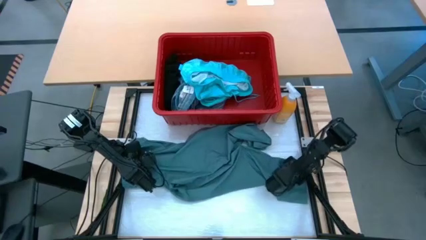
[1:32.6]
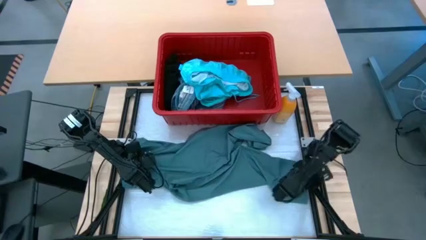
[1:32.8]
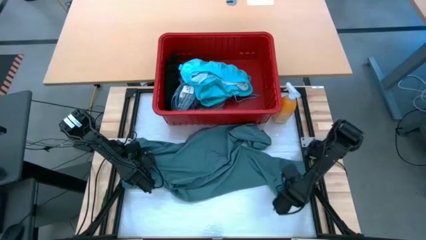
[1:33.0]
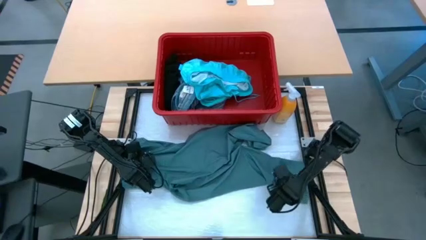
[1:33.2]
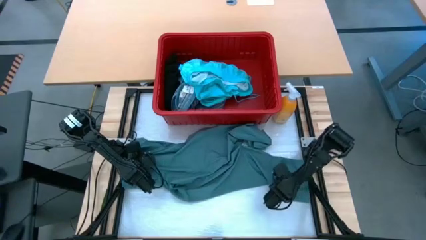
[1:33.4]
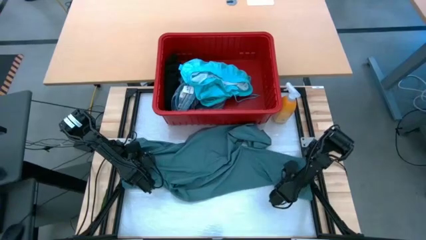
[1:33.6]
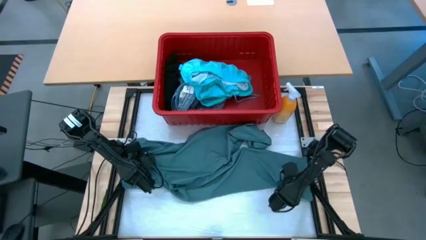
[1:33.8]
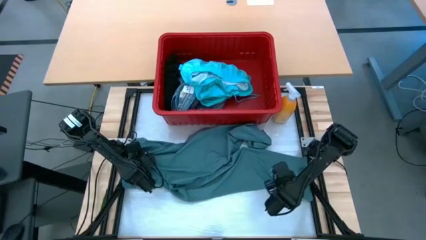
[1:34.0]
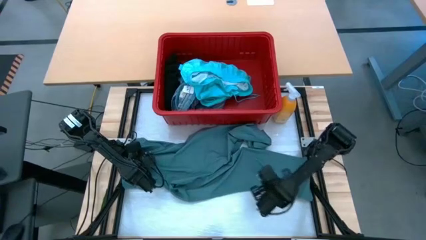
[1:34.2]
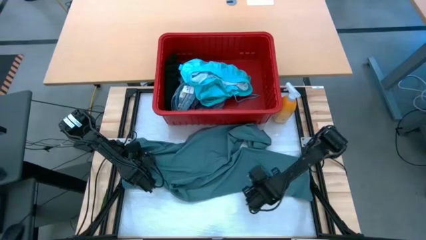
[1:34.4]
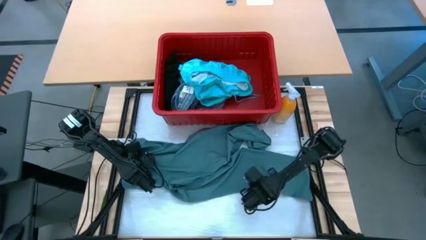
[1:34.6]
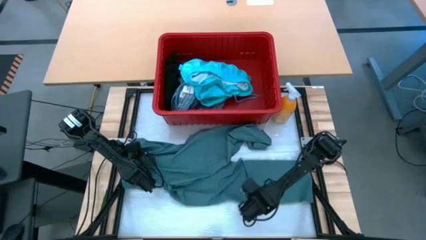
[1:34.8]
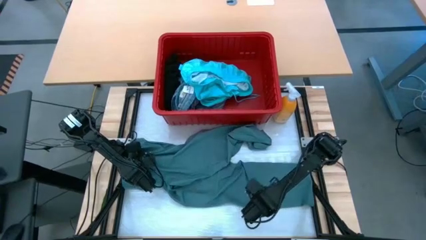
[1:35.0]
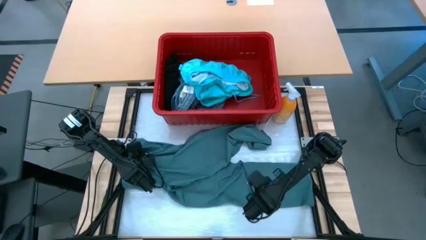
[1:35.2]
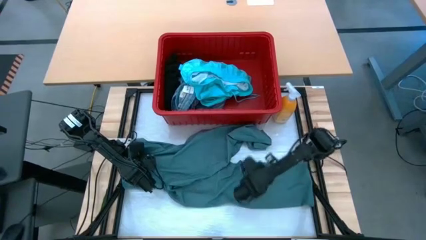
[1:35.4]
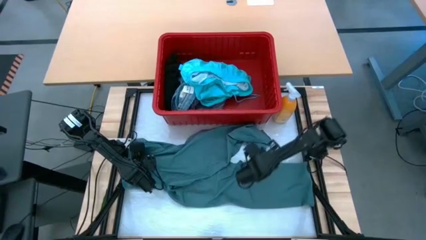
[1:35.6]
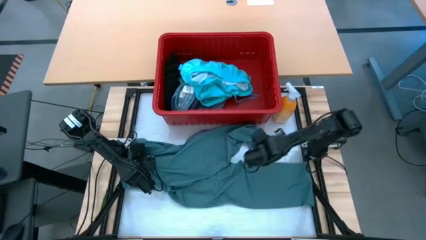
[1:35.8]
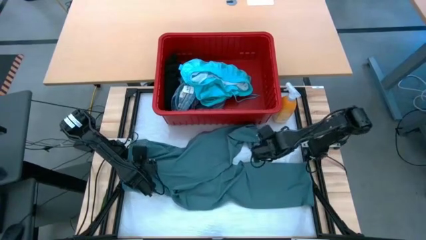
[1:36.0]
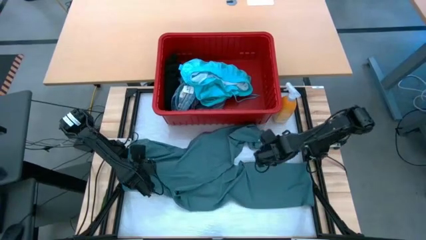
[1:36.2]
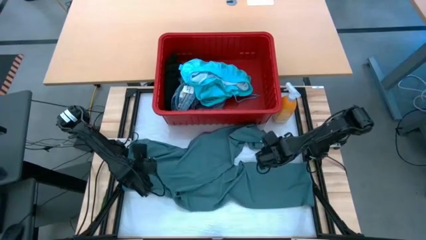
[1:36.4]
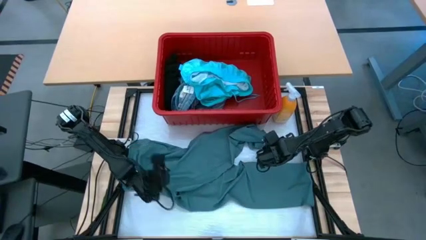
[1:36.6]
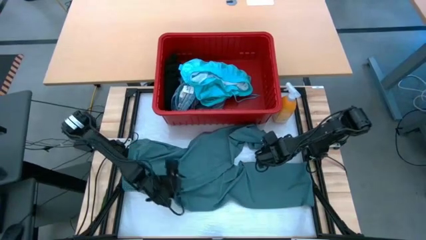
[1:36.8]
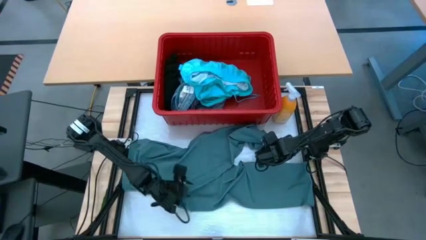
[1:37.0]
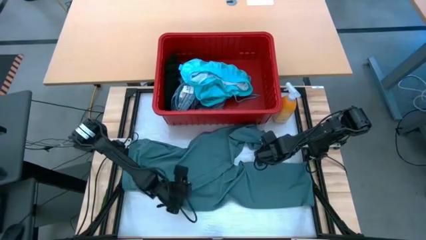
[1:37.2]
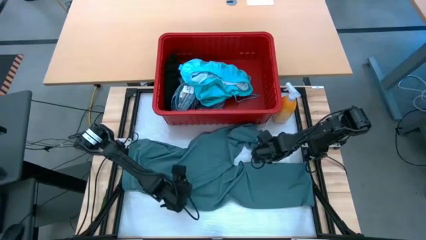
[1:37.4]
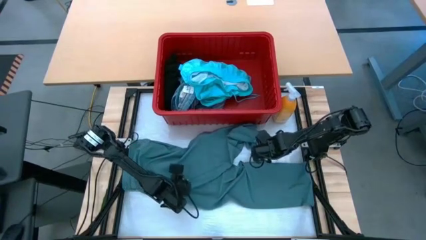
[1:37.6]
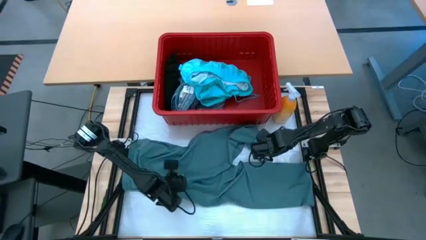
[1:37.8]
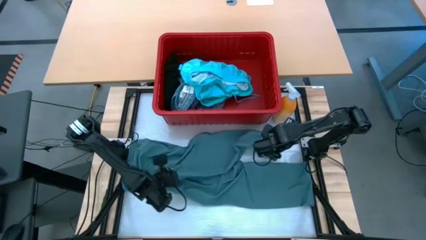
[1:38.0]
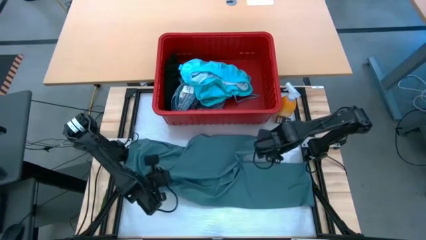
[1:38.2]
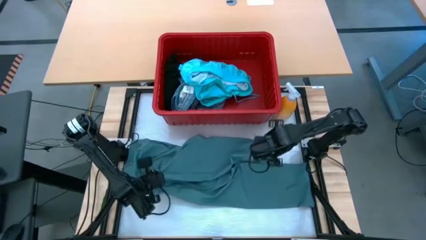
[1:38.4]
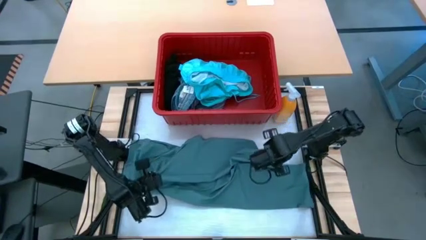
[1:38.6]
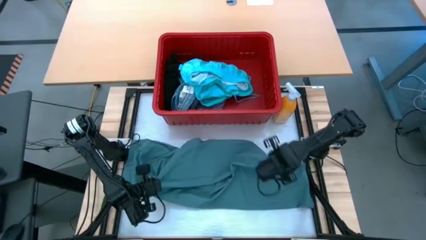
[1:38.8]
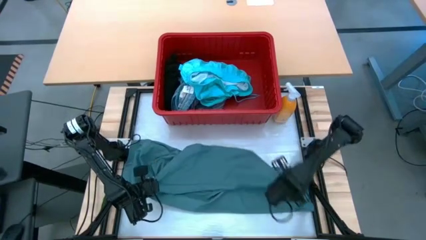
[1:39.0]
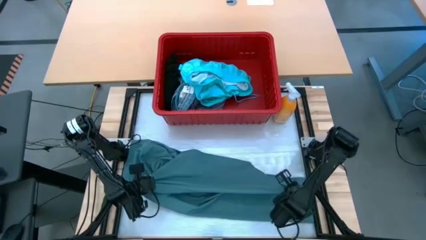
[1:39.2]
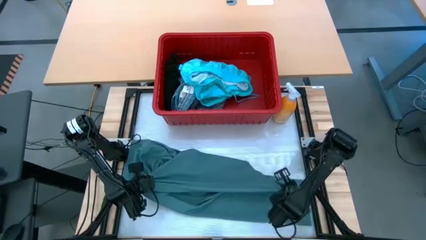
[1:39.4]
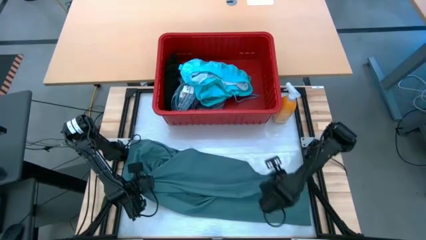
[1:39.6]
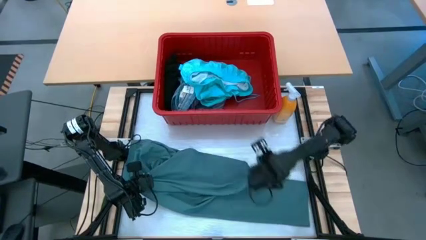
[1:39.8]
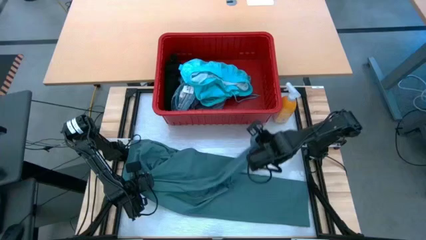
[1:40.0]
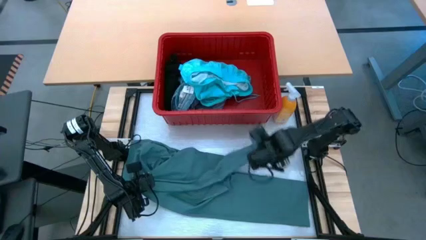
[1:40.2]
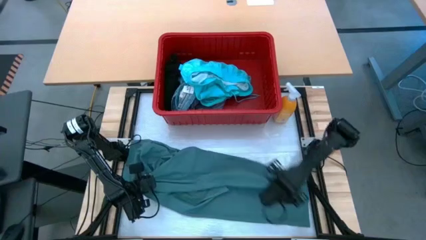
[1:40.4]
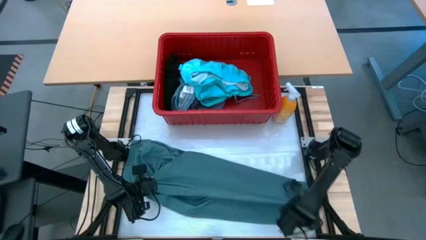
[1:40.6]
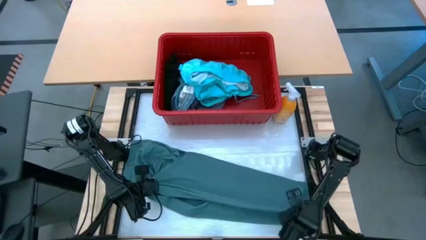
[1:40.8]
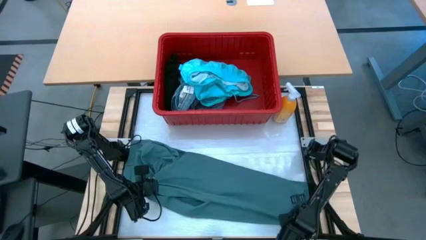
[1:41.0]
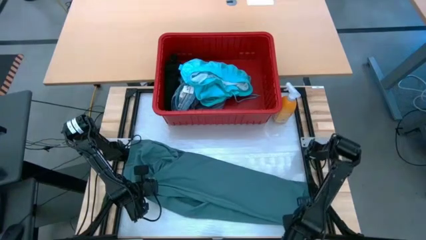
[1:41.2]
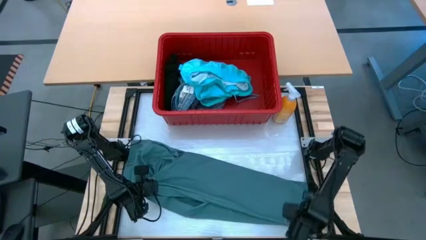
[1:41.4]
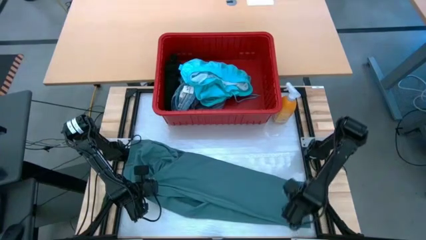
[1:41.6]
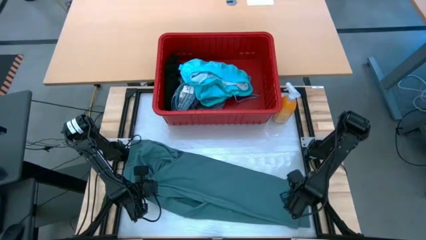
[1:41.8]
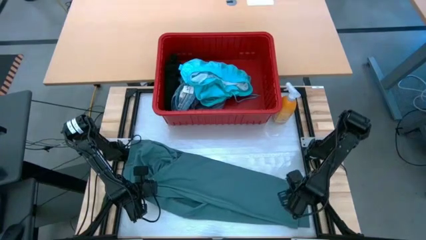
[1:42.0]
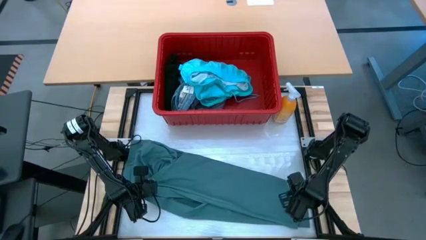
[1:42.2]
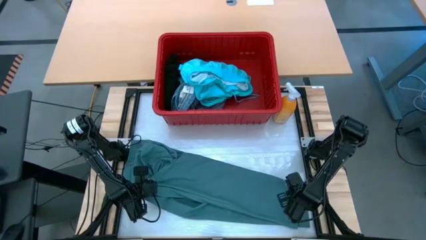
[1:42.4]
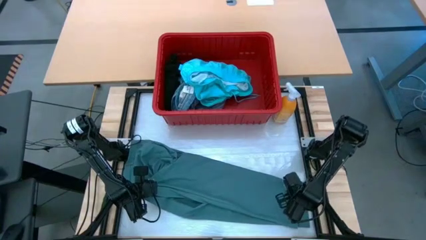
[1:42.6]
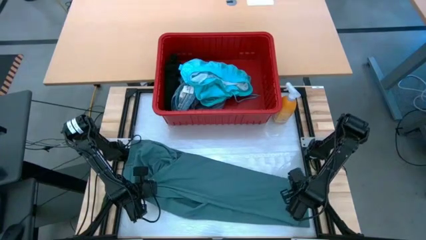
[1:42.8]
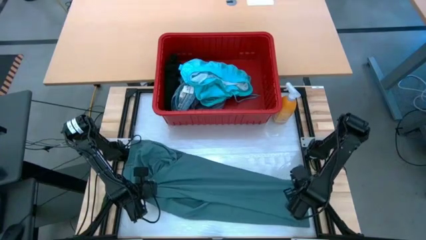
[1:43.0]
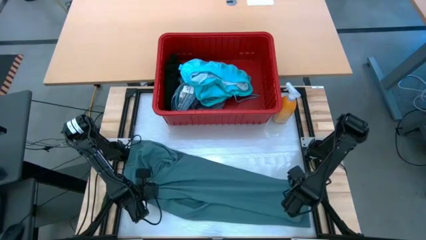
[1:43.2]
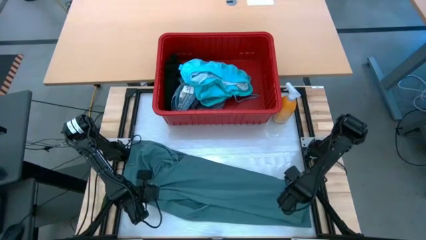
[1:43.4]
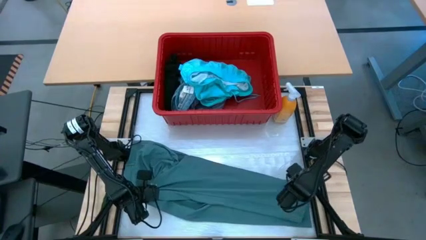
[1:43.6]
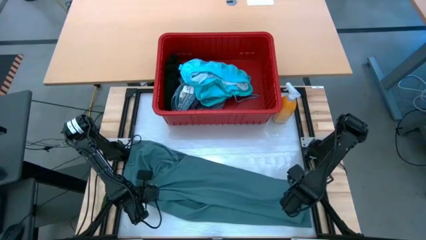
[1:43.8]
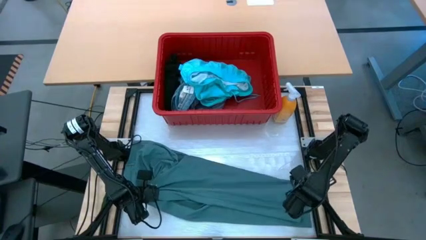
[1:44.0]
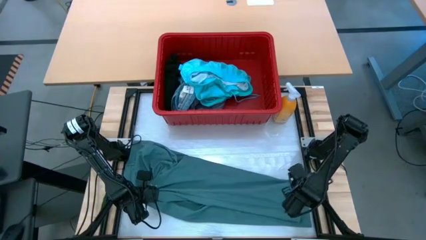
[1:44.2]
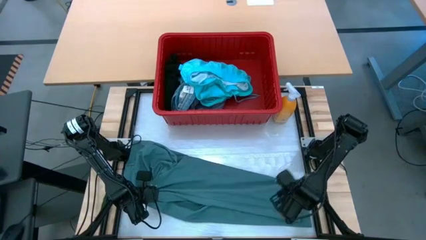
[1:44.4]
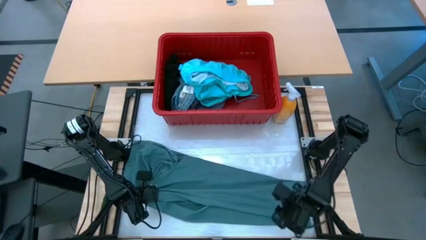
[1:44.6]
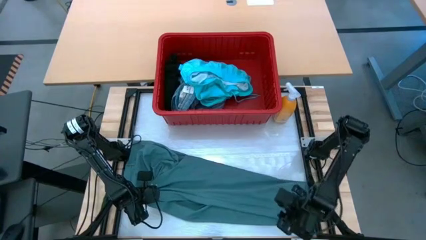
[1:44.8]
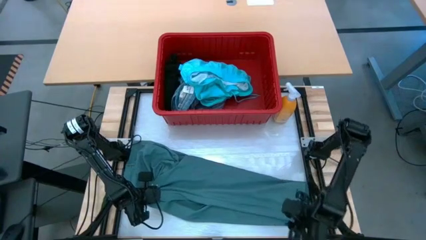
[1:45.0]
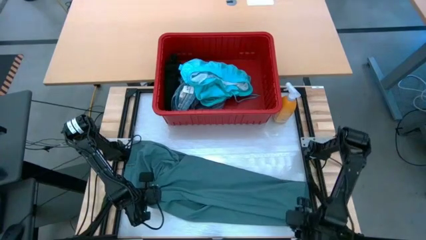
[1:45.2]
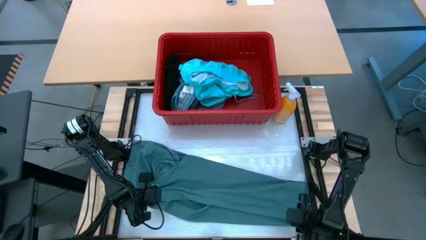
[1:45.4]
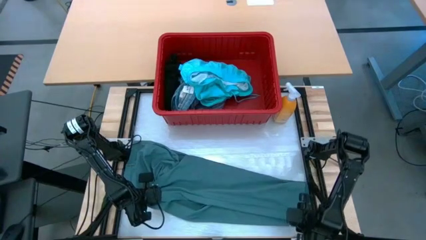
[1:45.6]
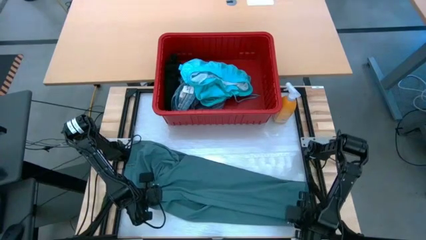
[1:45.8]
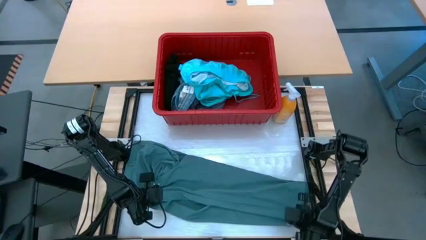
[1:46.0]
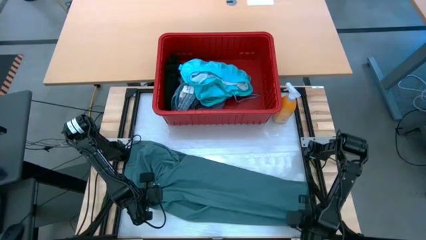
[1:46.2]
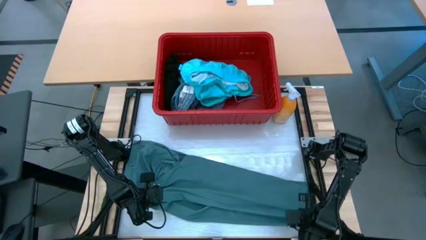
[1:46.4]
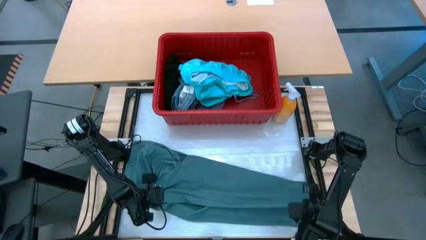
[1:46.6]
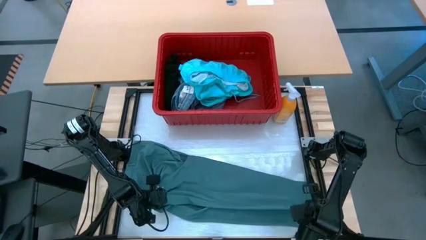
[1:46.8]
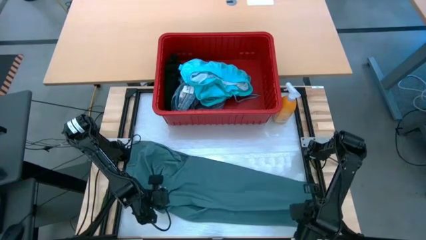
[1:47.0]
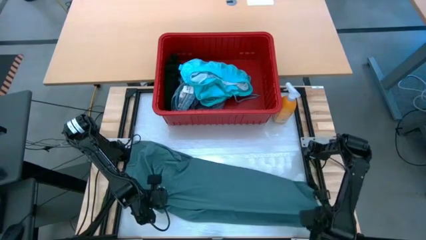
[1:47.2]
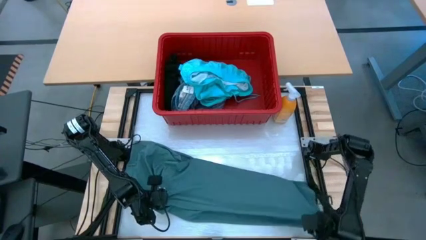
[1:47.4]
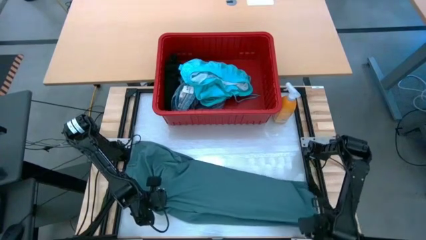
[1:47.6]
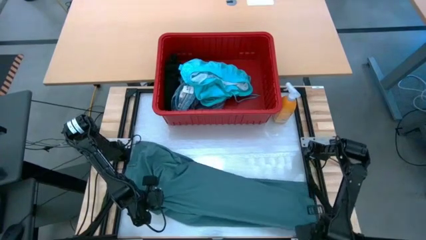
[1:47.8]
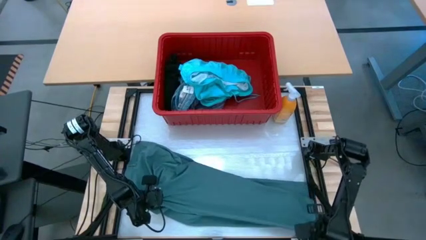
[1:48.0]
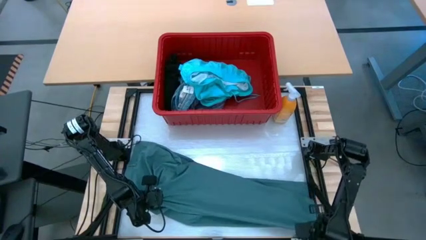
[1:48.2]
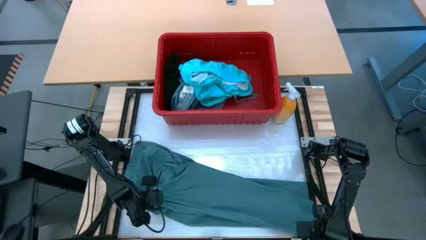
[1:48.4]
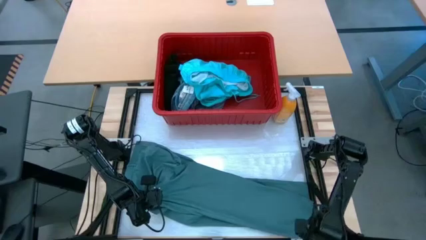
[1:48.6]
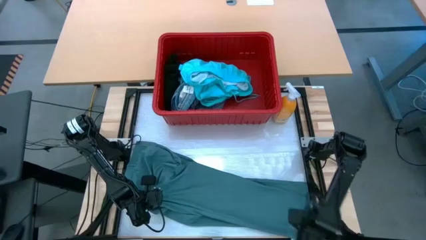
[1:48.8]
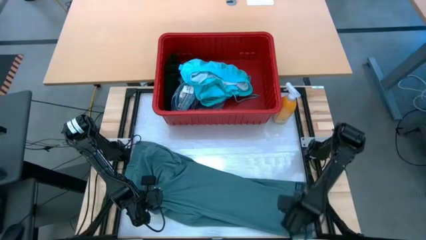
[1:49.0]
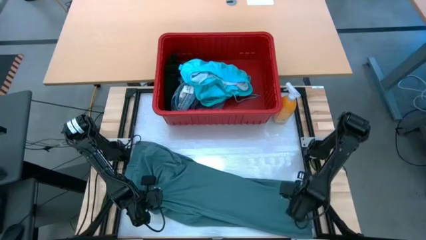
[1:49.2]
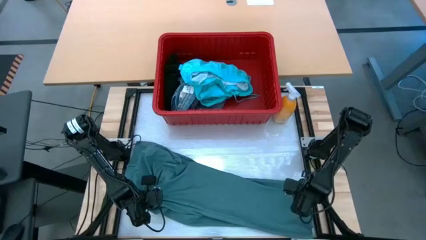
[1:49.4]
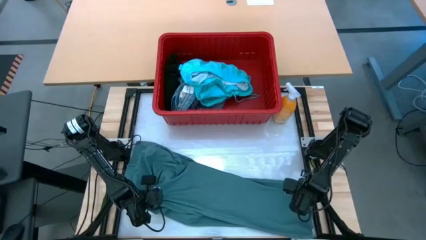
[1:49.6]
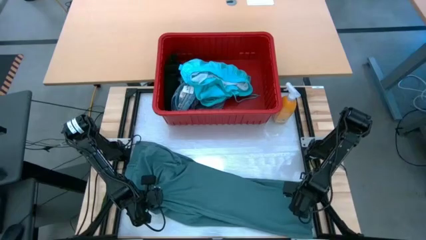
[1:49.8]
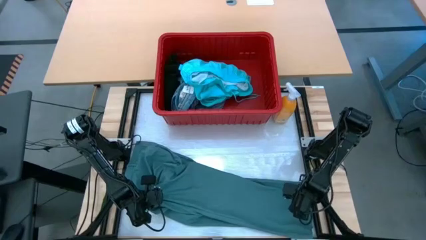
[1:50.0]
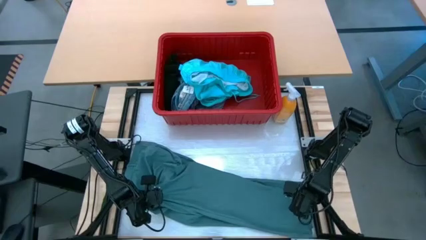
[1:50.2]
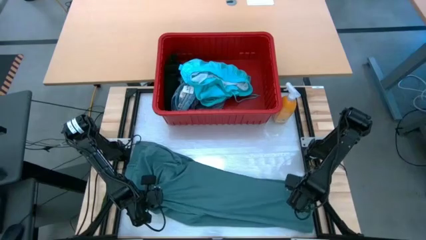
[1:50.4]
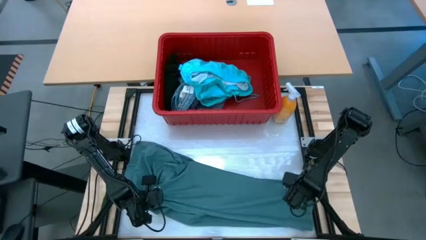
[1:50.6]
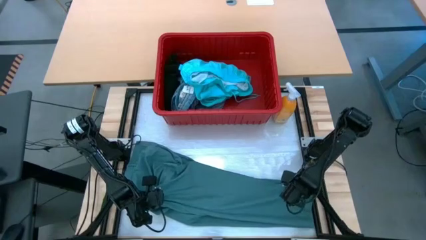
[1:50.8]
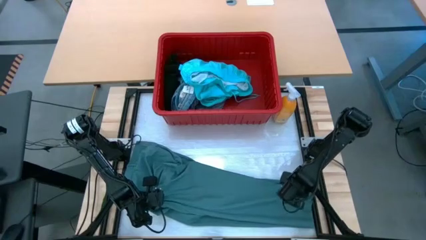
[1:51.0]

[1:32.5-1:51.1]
Task: Fold Laundry from Bin
Fold the light blue pants
